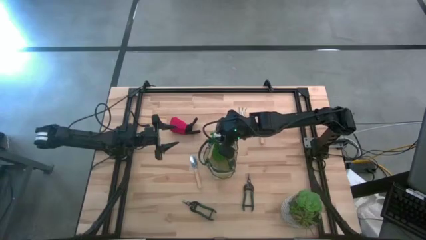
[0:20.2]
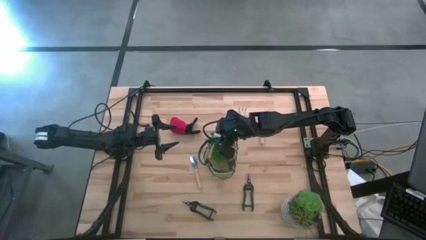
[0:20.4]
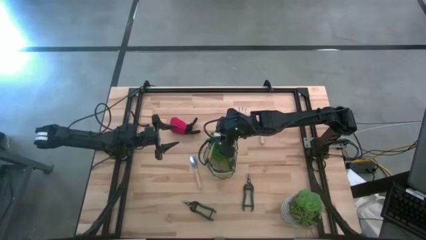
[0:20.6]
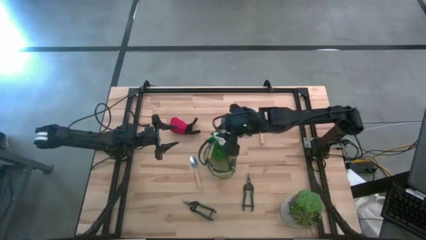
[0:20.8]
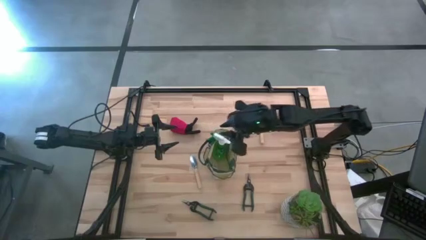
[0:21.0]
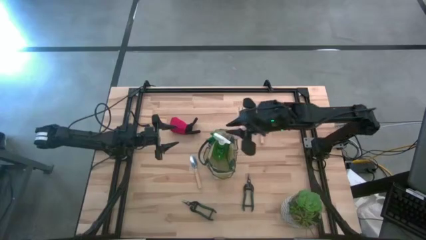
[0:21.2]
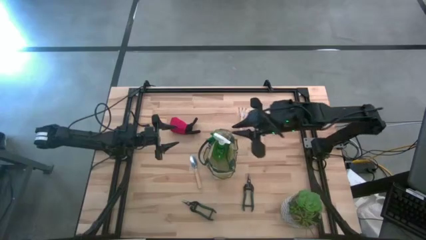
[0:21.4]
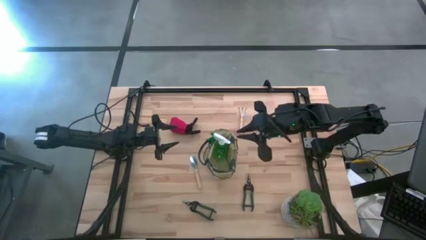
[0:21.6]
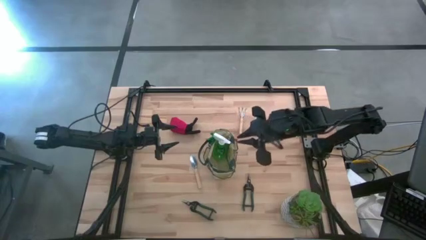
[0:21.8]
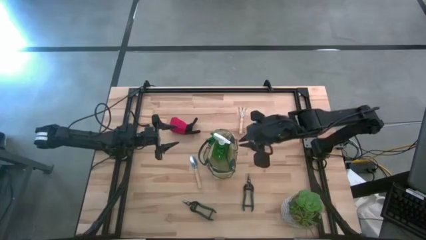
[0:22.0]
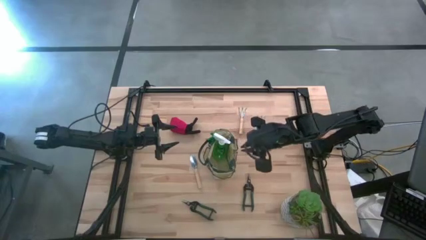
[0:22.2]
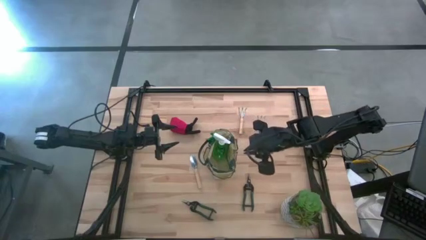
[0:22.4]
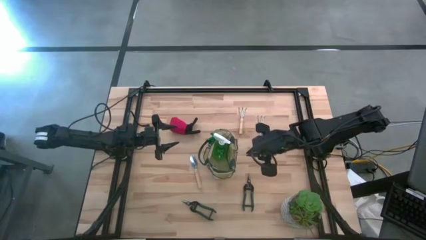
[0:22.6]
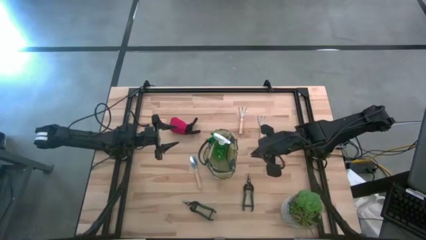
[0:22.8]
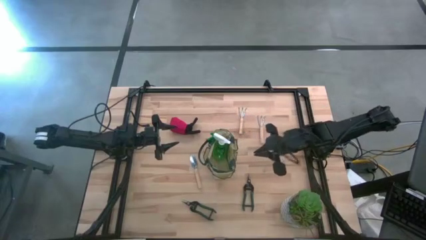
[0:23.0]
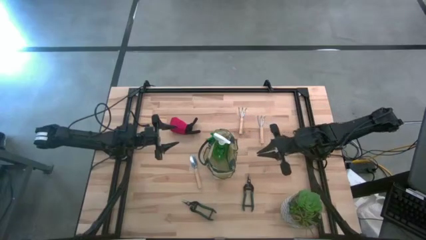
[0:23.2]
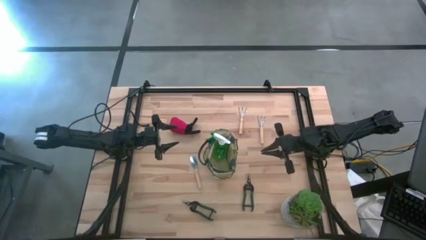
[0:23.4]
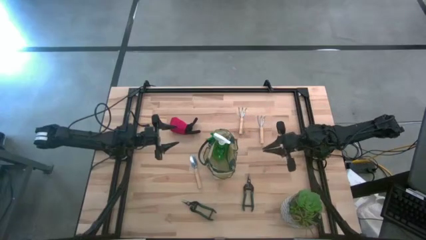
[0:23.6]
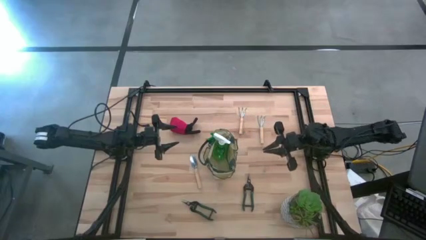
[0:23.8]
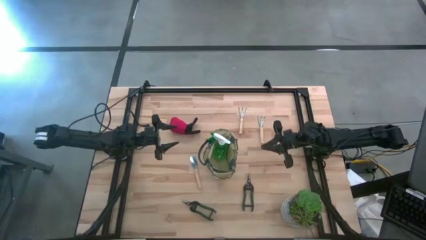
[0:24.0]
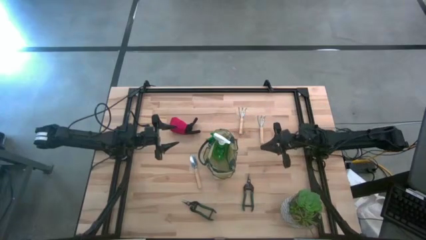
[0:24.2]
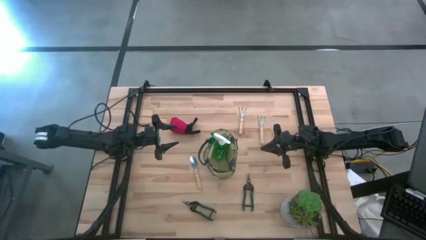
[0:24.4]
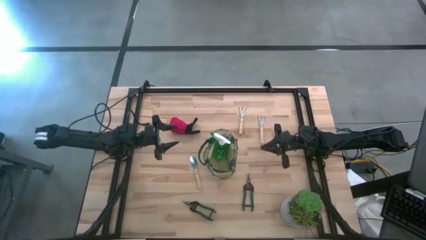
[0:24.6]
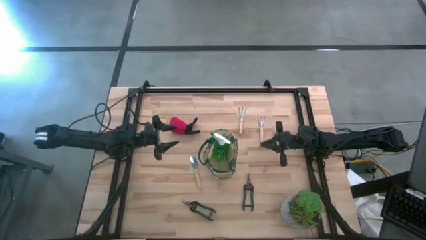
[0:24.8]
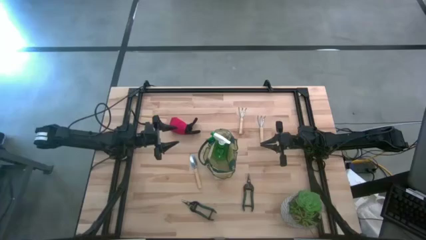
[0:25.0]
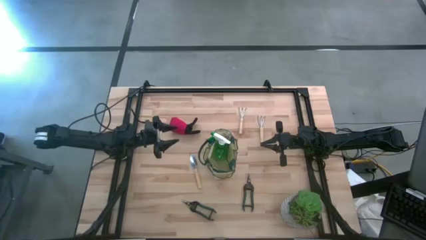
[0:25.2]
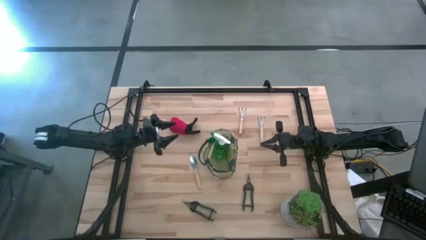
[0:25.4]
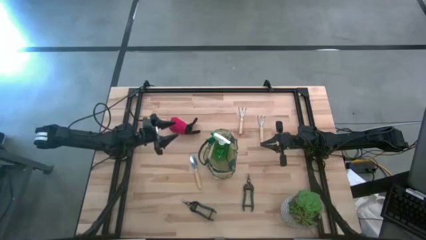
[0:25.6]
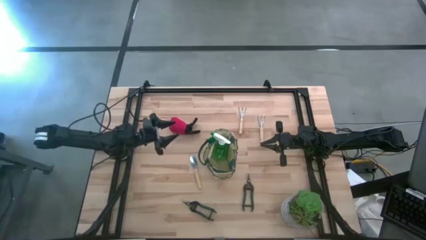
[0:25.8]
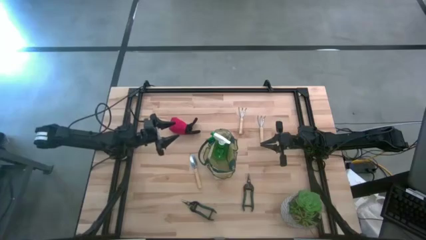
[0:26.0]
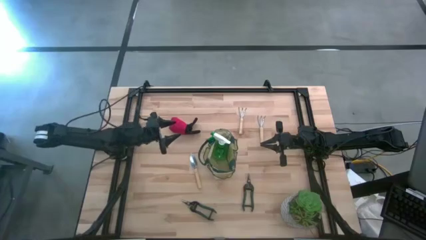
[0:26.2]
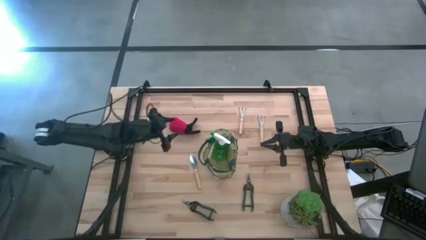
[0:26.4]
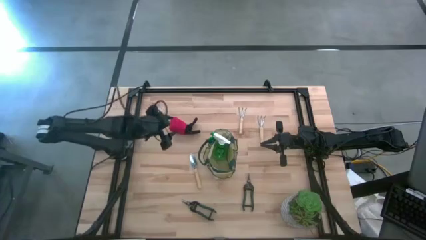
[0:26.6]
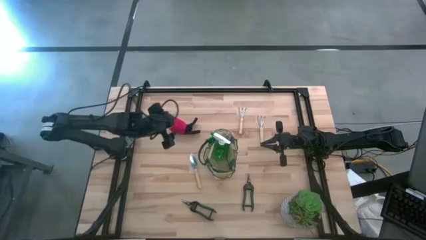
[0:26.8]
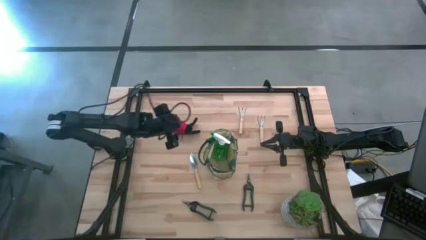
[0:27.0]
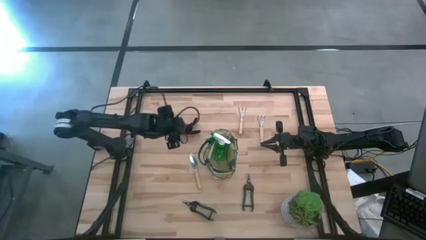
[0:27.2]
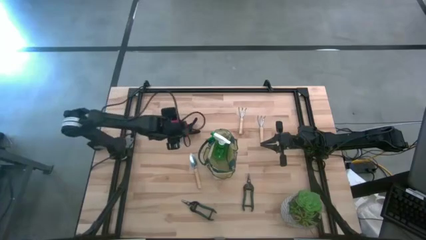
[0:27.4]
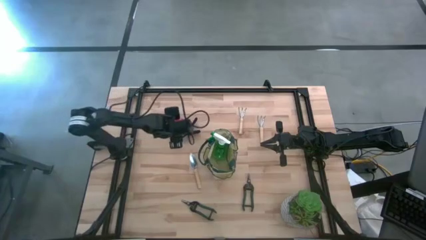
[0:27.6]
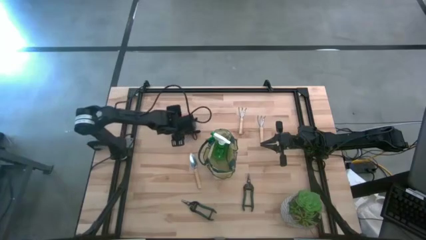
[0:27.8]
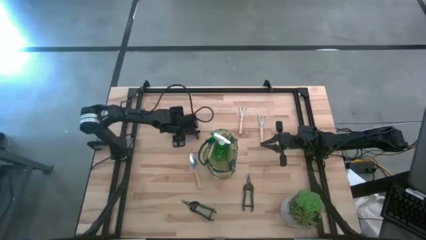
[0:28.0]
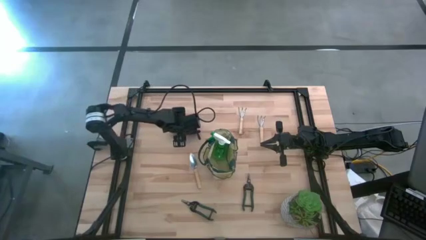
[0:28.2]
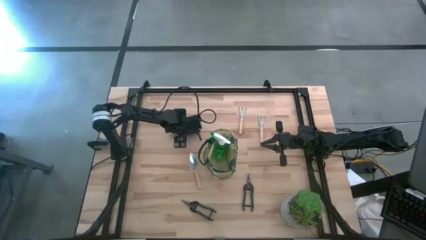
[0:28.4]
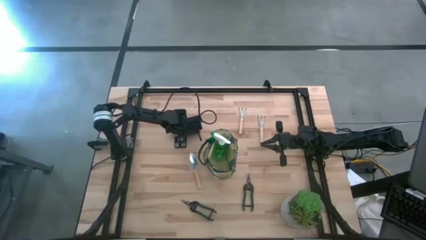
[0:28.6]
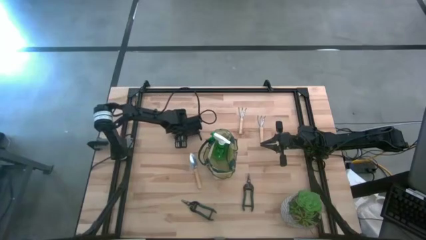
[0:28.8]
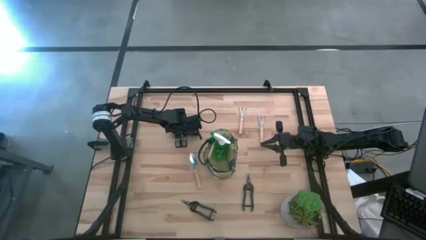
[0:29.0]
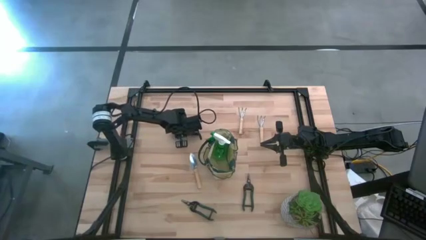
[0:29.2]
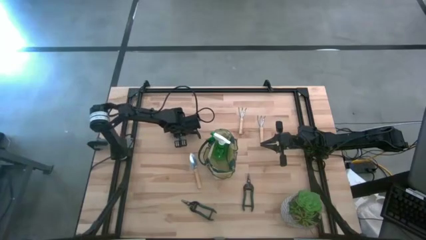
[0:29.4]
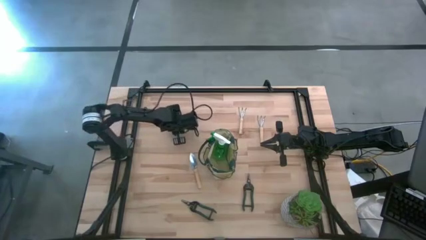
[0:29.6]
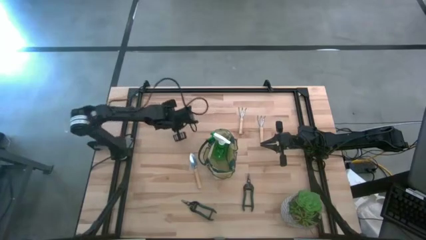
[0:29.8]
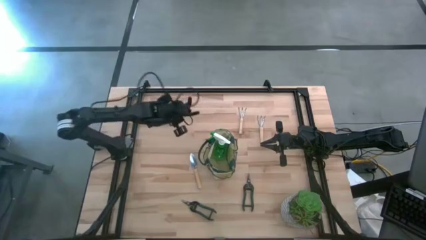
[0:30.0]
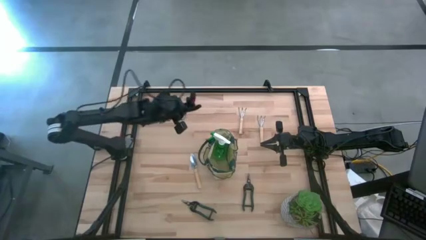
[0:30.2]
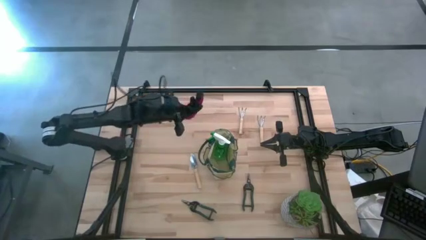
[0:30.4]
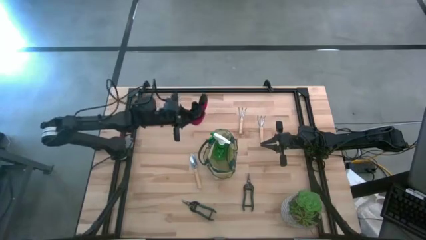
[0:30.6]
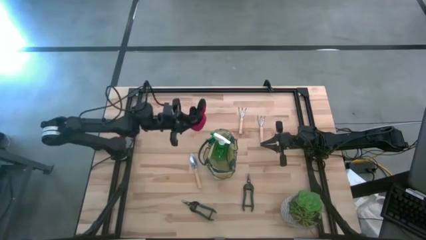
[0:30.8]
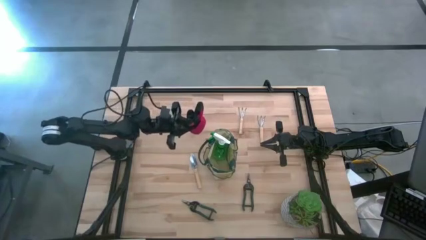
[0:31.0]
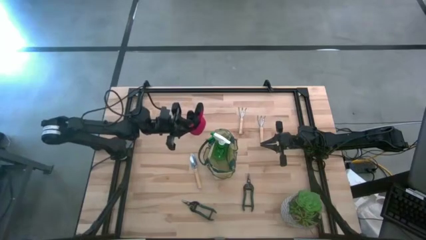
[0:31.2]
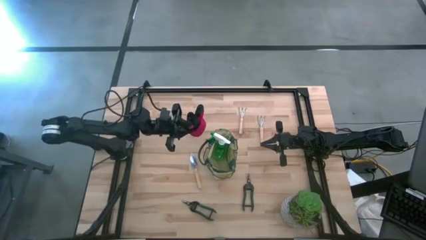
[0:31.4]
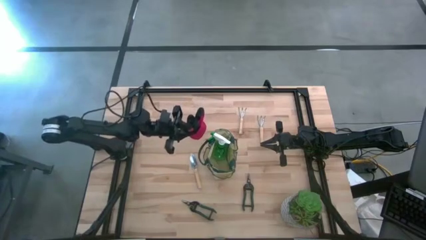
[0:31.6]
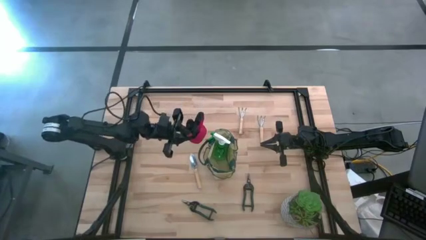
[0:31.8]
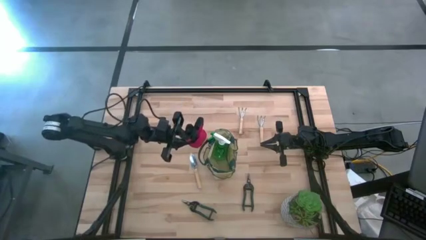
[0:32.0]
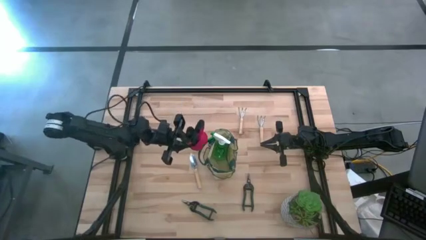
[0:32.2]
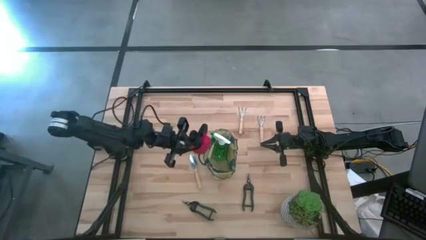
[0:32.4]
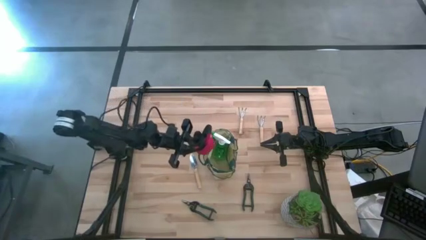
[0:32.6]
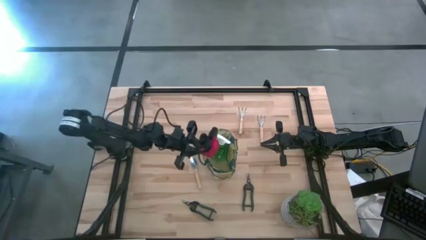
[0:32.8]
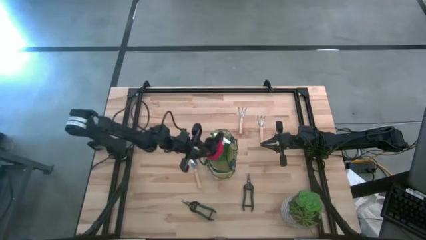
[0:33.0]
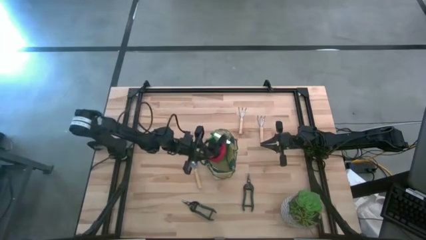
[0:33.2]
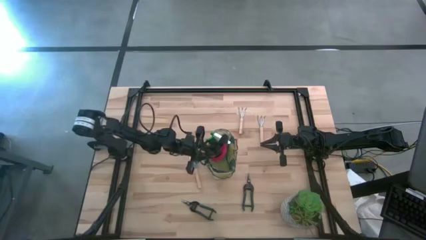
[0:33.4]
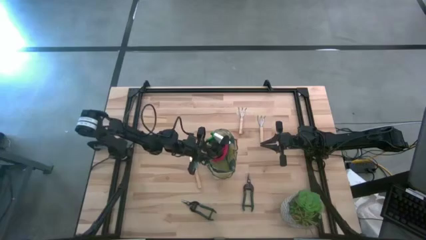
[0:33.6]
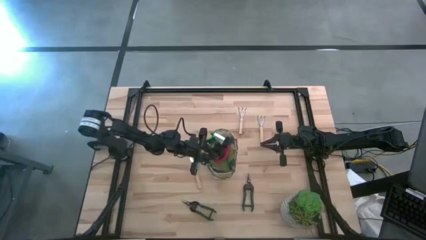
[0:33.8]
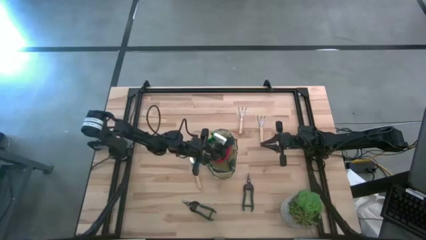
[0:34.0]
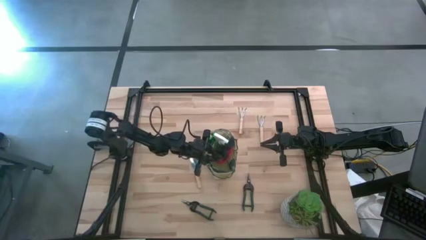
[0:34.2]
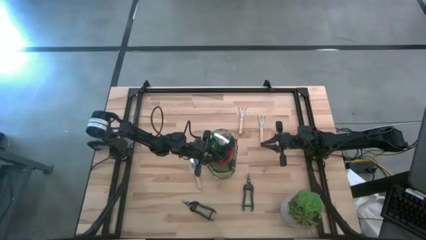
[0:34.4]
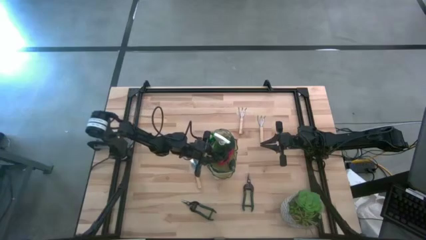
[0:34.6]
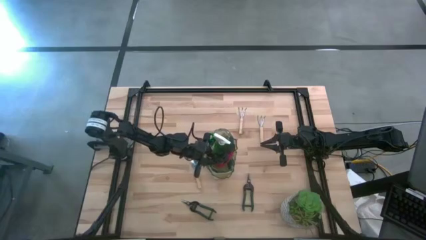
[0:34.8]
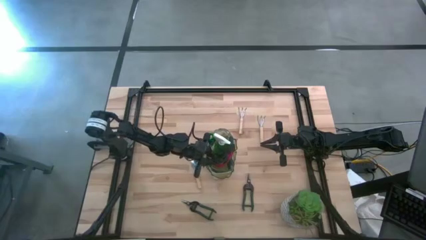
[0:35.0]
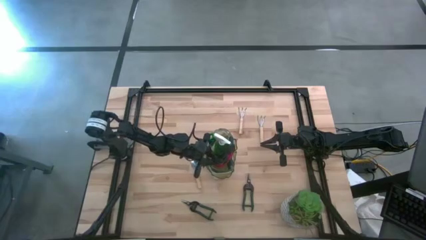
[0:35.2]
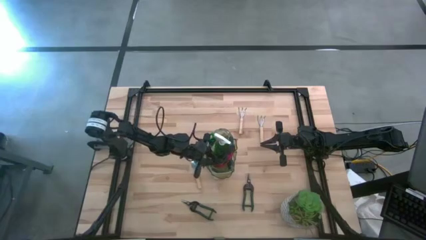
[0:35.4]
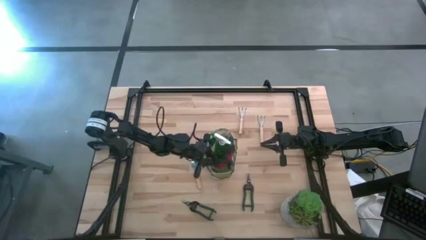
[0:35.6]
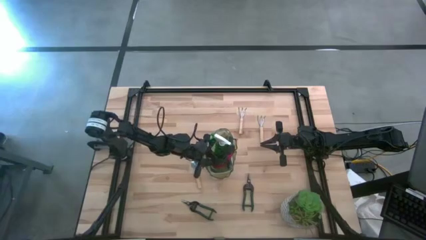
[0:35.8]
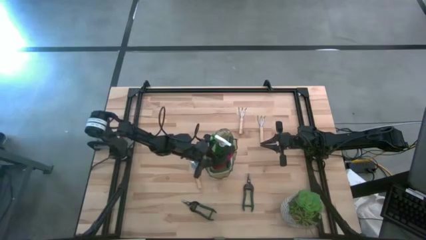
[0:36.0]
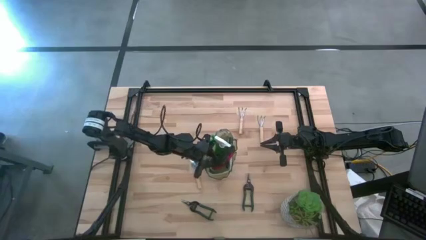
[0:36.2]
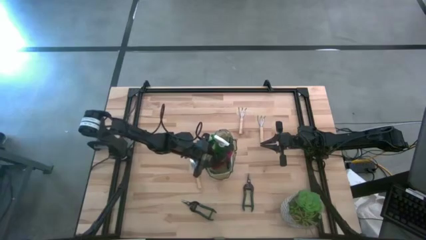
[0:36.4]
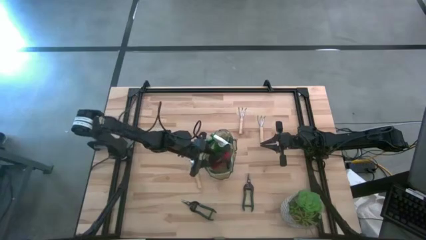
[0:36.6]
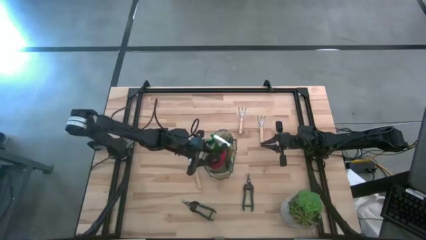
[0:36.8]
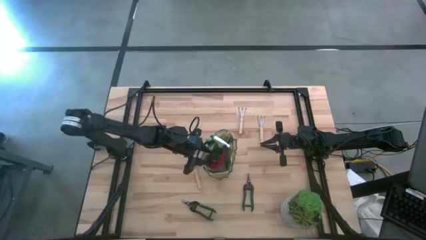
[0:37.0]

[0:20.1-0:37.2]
Task: Pick & Place Garden tools in Gardening bag
Put the red glove into the white gardening bag
